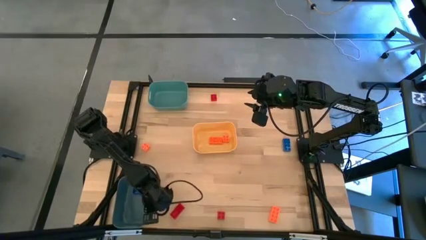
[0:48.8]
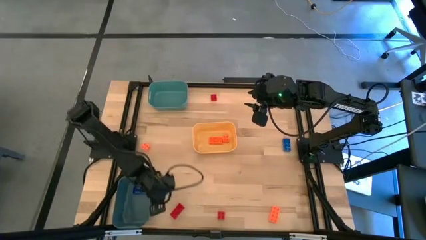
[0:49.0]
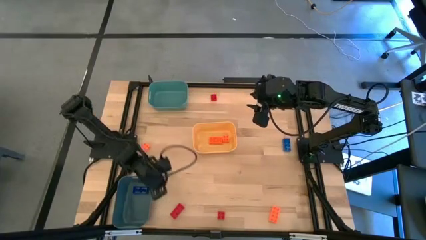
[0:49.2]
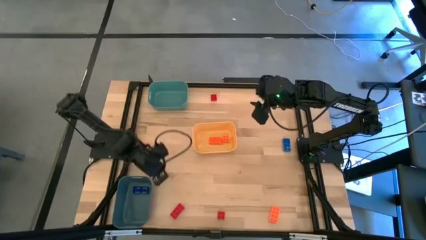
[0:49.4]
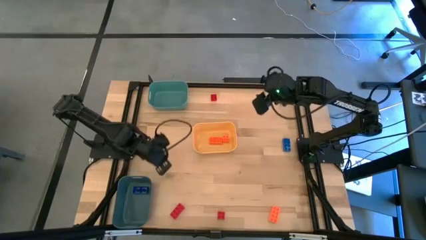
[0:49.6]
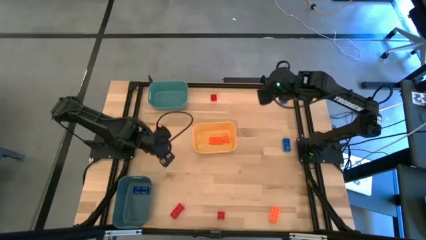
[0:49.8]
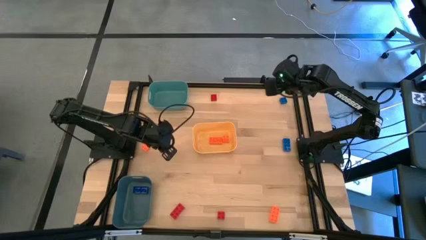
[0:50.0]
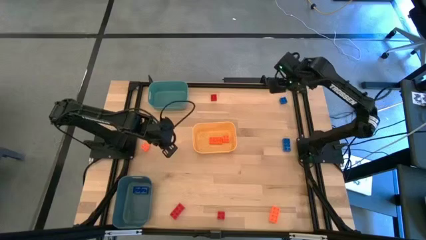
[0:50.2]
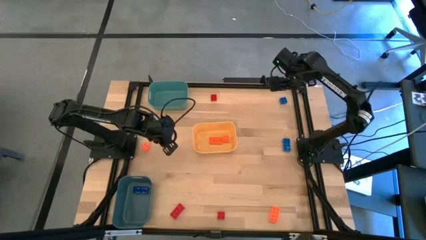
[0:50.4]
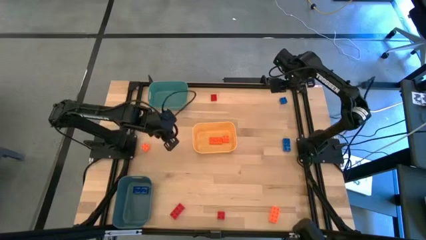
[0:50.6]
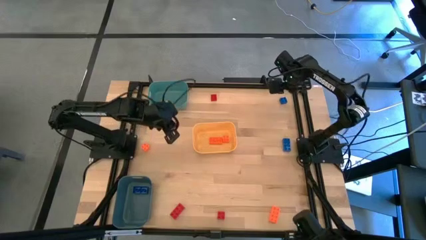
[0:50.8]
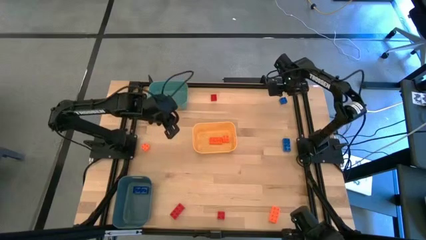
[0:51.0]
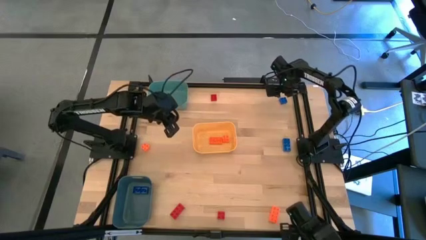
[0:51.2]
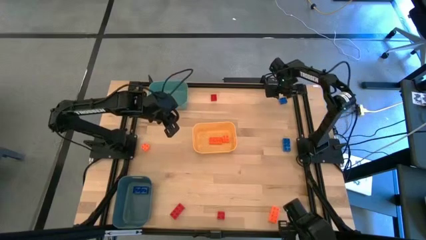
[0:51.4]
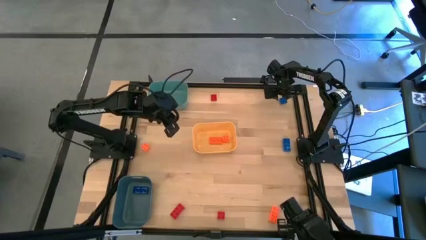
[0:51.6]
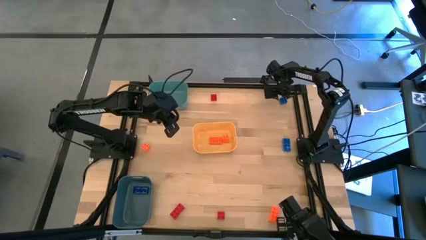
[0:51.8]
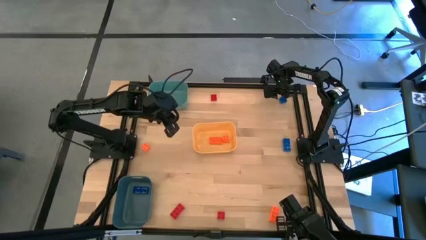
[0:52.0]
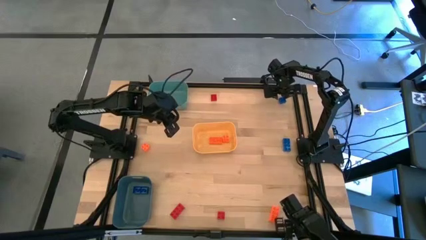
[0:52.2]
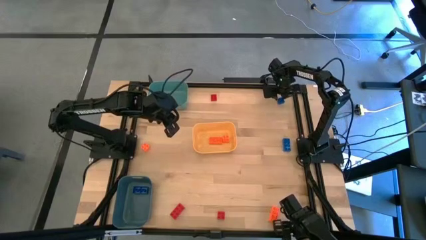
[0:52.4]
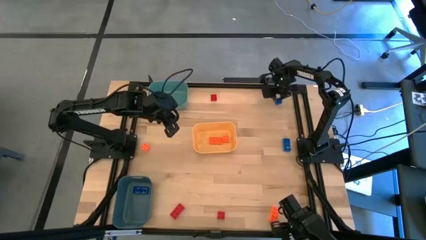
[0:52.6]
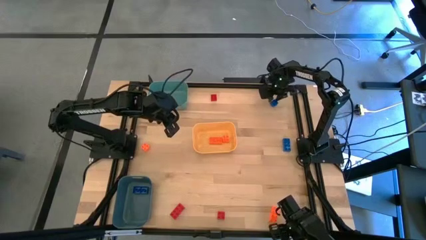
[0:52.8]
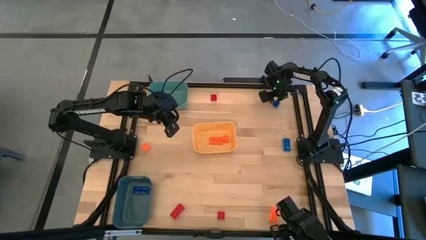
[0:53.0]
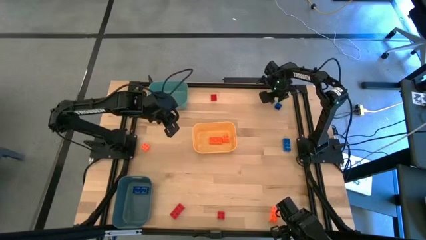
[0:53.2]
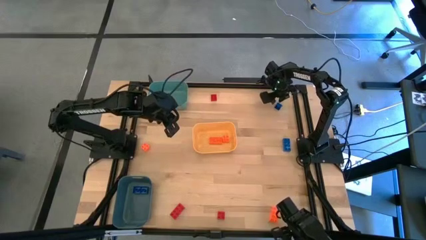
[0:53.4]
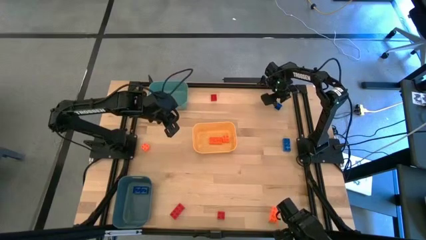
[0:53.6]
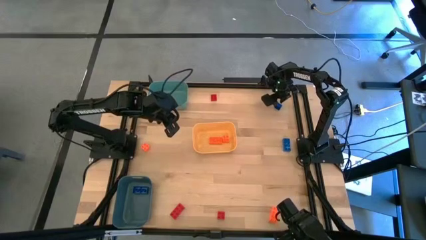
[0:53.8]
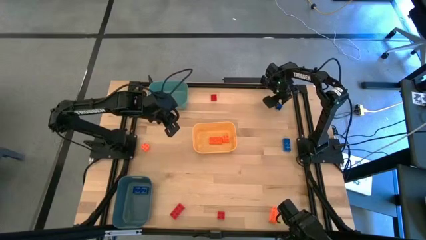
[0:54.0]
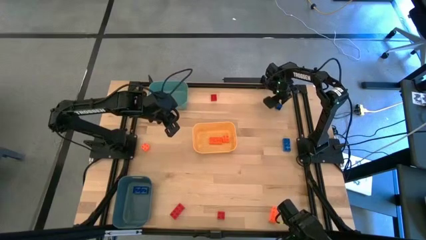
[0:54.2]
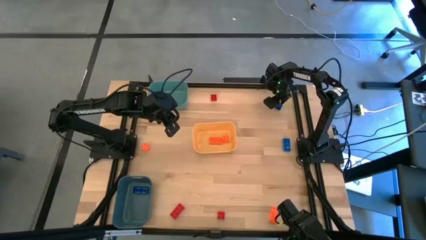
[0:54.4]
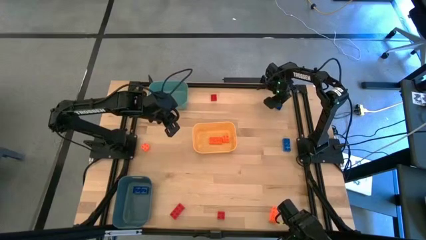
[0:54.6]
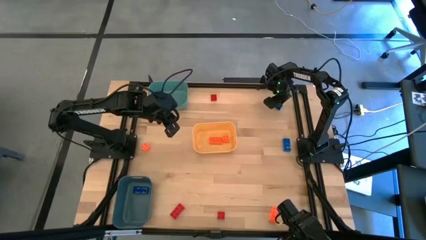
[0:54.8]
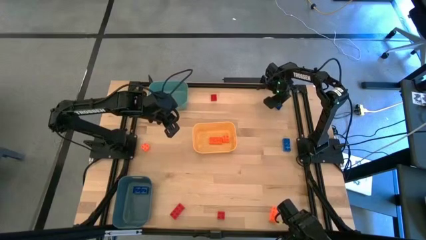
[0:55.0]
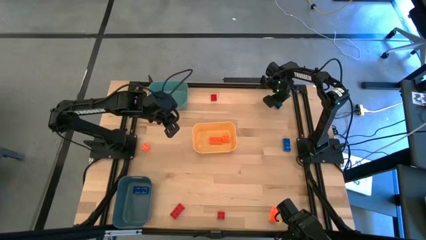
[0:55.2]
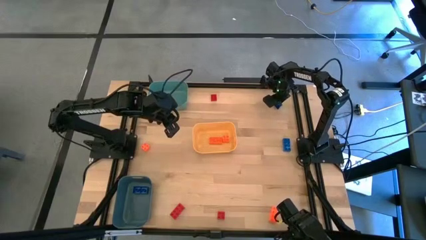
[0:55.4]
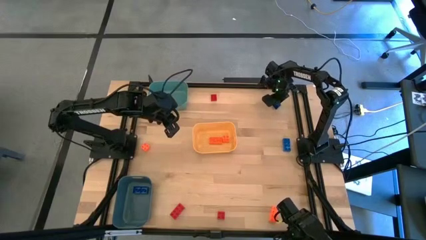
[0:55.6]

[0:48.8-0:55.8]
Task: Sort & place blocks by color
Put the top blue 4 stud game piece into the blue bin

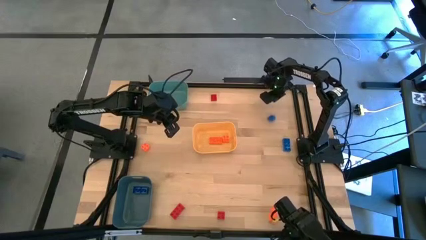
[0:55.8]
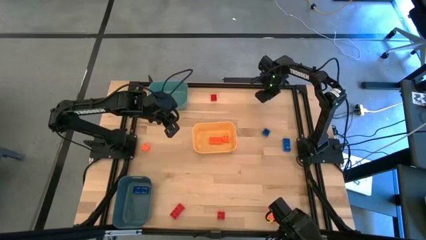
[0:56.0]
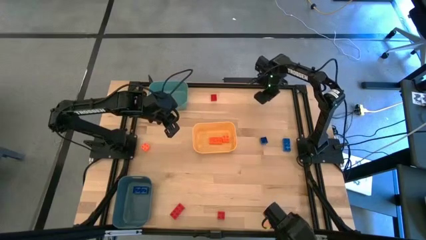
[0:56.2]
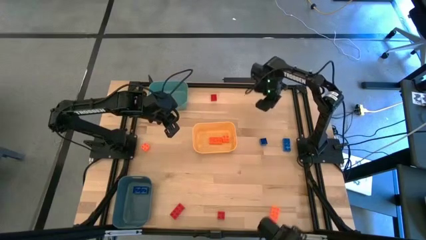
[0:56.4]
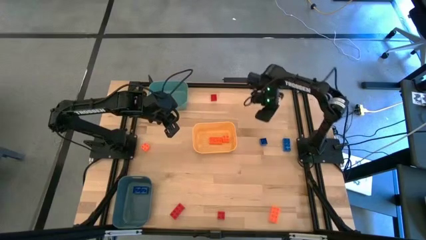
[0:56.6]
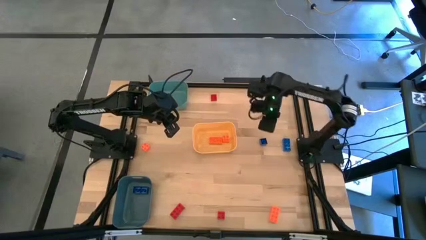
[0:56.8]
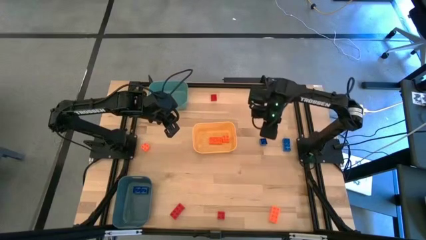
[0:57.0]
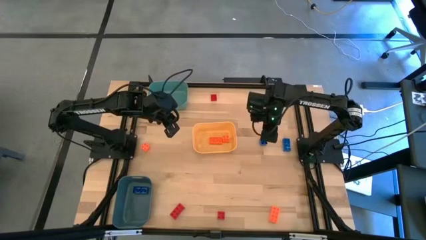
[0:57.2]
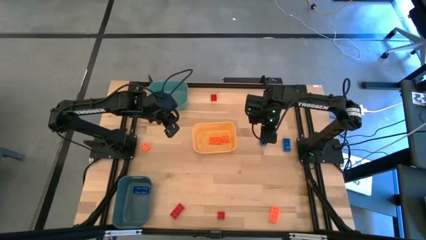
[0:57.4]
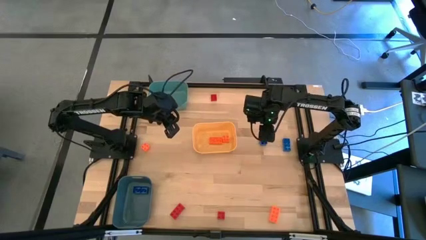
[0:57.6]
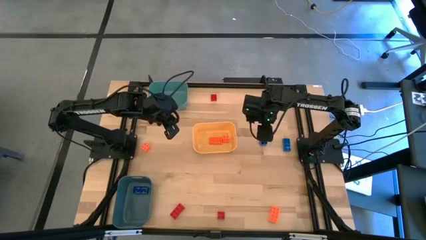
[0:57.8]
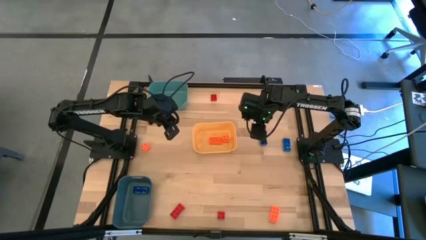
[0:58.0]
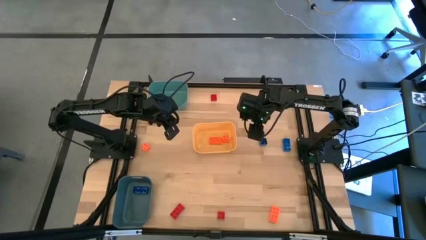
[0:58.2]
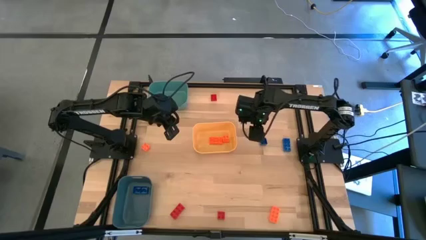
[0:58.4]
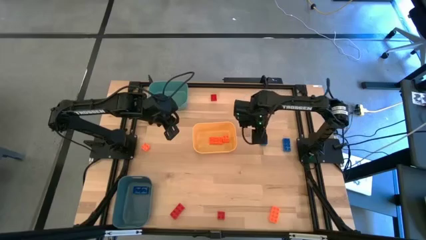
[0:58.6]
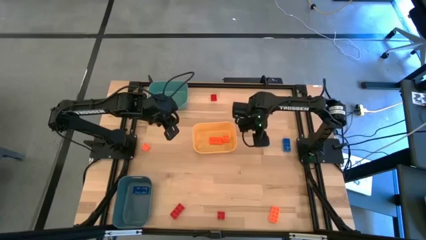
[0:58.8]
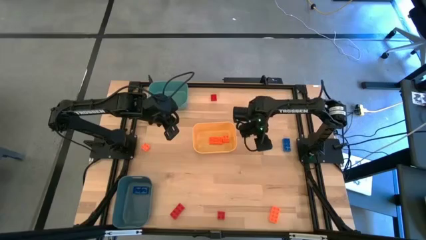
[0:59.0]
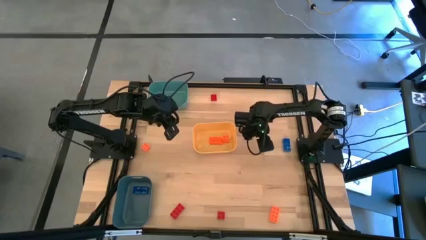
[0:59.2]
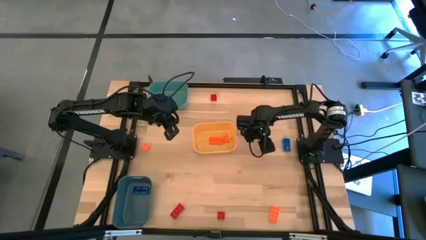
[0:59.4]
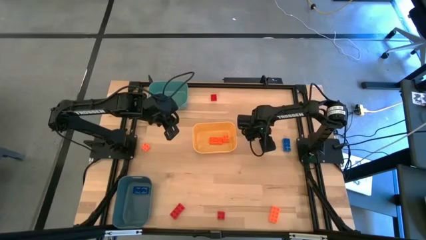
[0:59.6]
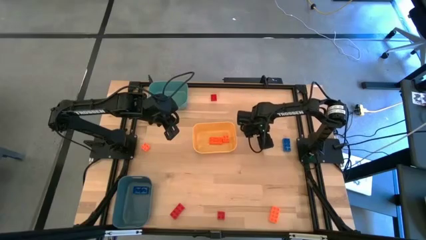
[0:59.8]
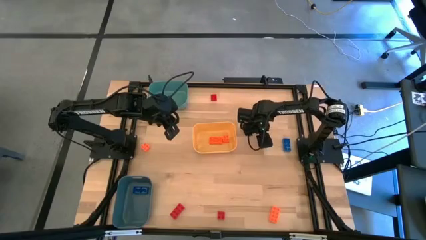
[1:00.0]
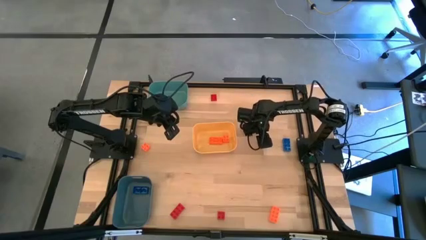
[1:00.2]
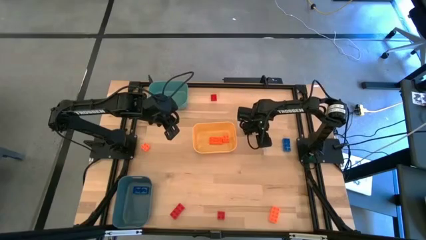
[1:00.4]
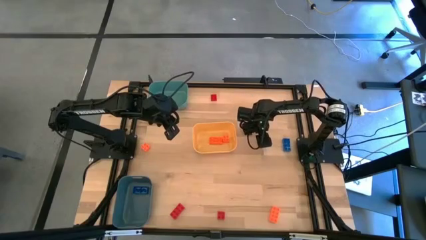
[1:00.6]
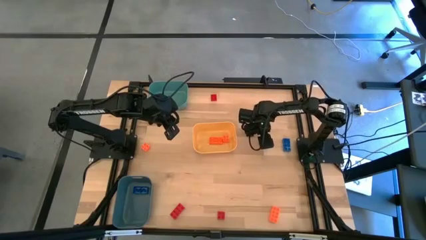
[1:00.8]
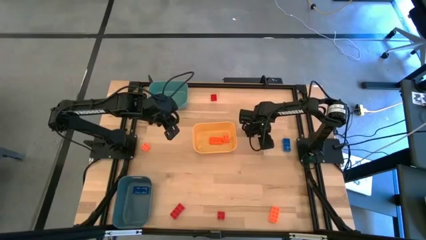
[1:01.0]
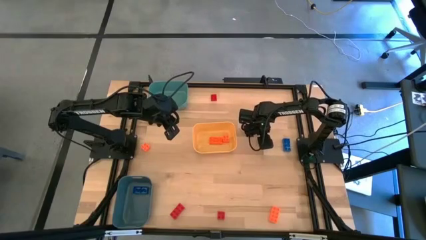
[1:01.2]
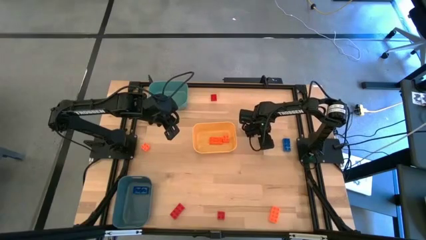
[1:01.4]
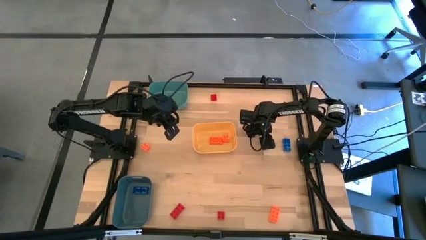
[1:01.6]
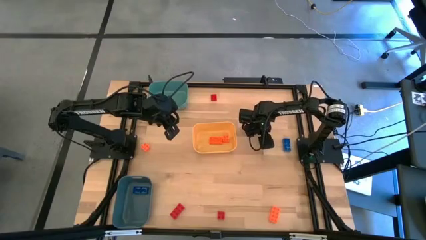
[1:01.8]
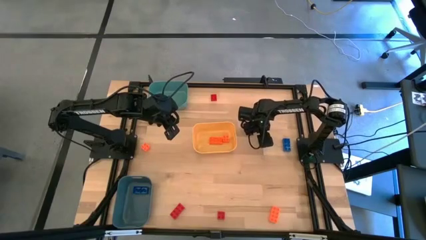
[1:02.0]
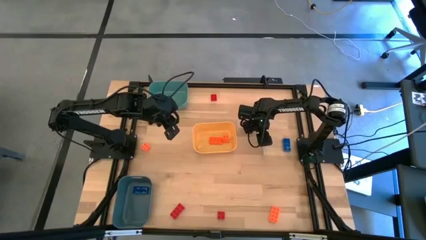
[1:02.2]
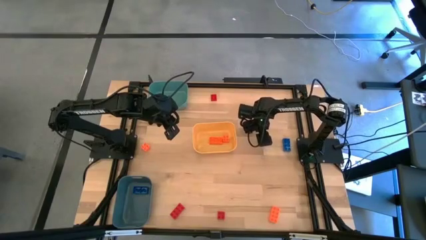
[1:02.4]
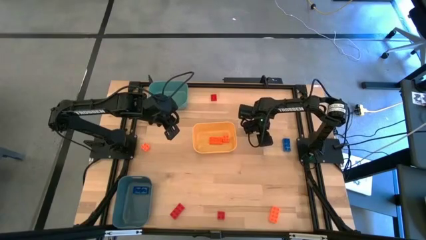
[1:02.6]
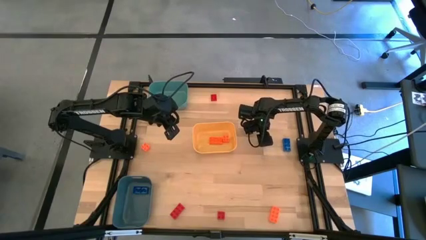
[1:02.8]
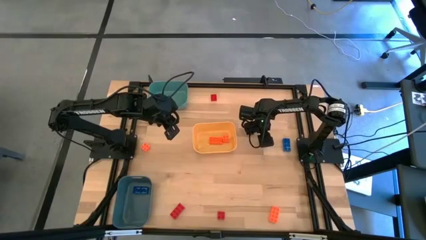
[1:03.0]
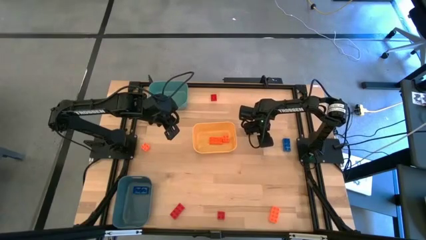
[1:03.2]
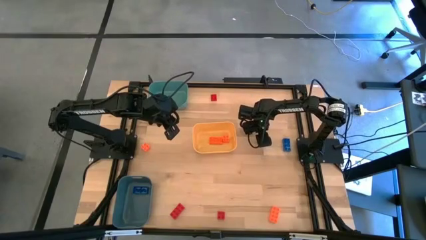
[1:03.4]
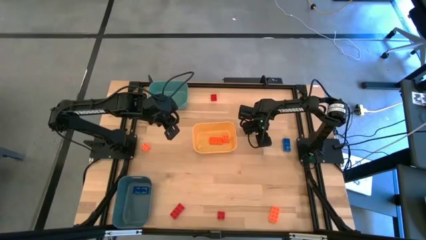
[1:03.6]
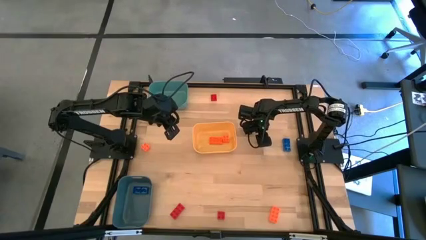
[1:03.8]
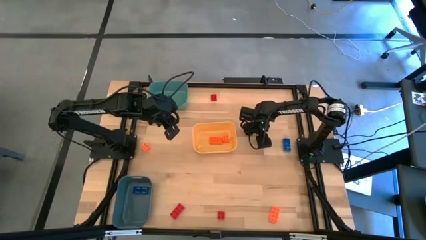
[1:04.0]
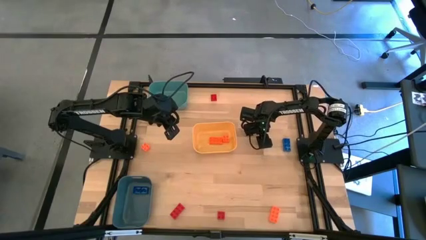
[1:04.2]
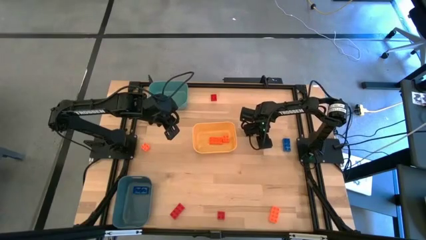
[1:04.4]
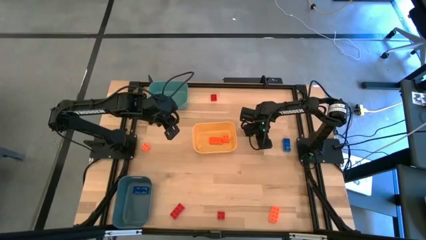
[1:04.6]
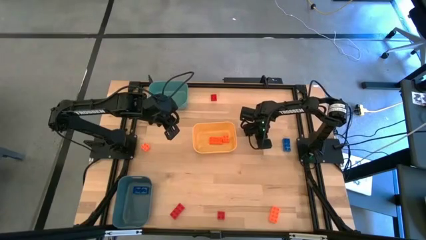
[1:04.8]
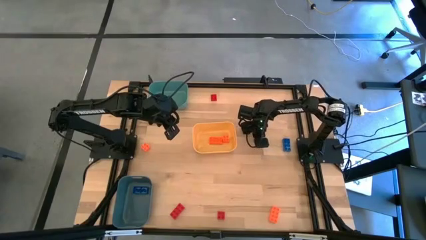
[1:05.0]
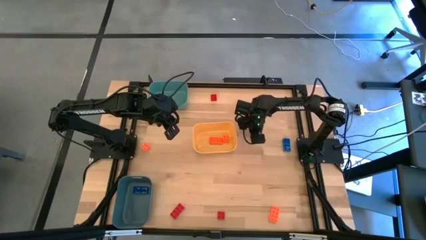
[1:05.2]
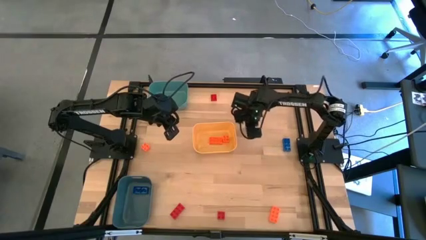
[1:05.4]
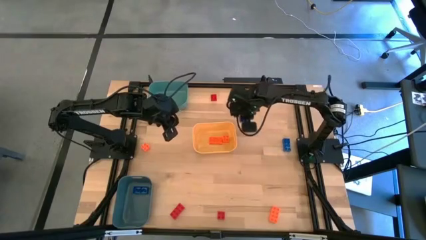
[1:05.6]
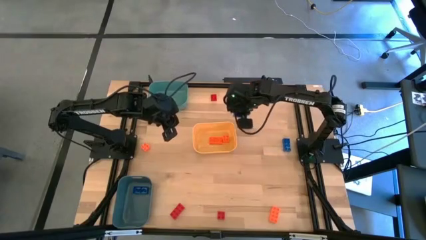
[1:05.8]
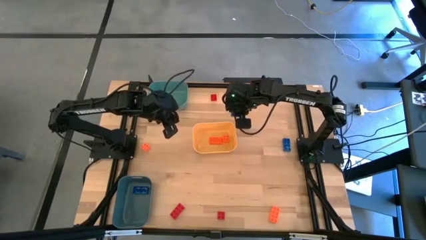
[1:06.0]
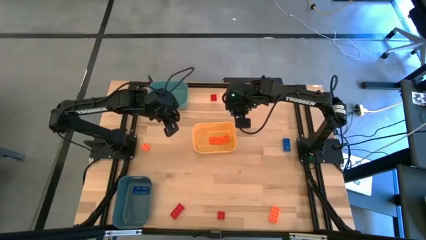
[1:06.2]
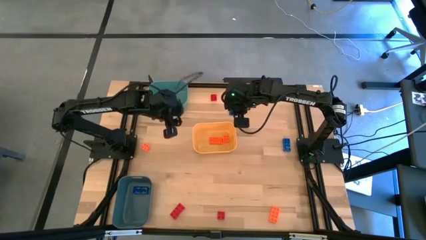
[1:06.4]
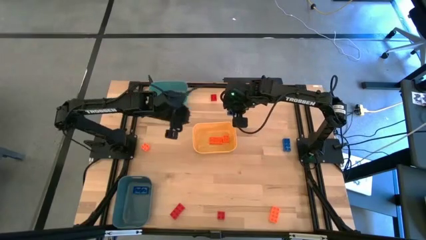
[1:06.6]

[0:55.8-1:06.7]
Put the top blue 4 stud game piece into the blue bin
